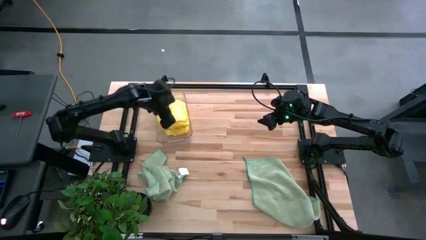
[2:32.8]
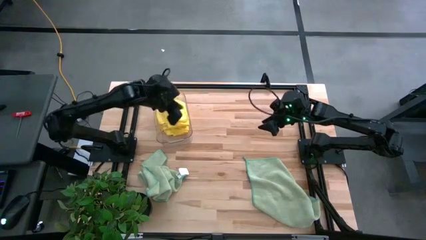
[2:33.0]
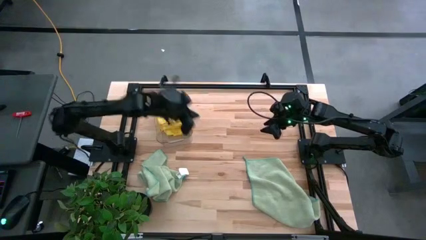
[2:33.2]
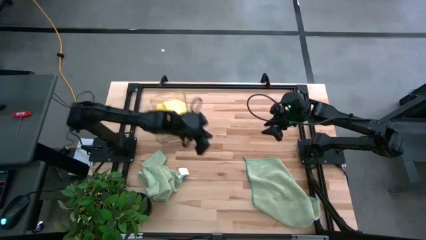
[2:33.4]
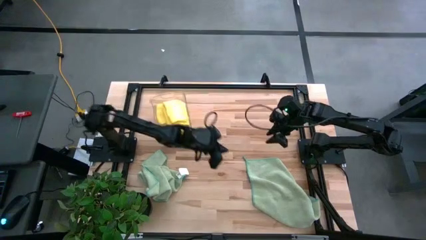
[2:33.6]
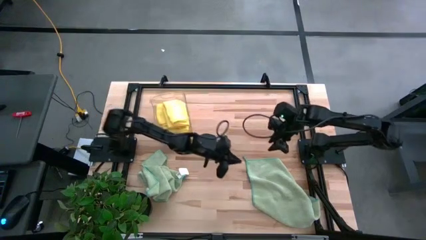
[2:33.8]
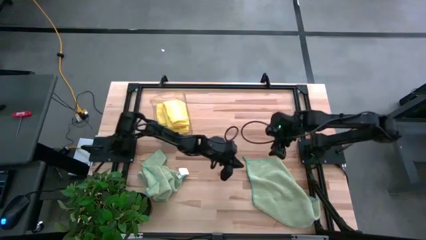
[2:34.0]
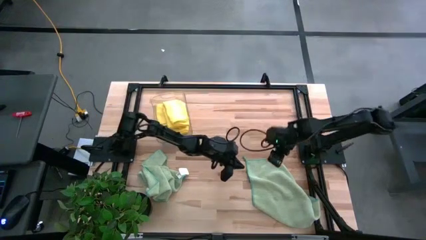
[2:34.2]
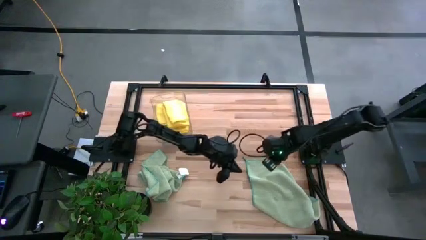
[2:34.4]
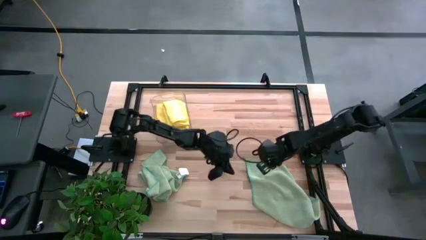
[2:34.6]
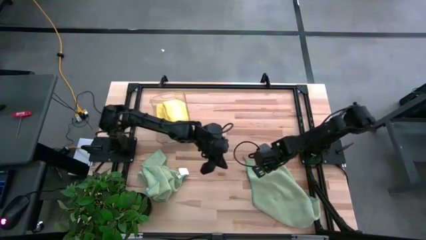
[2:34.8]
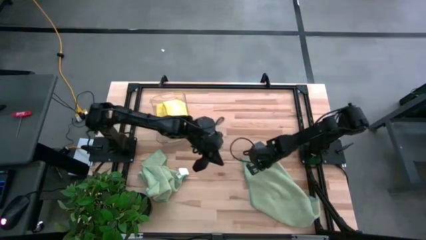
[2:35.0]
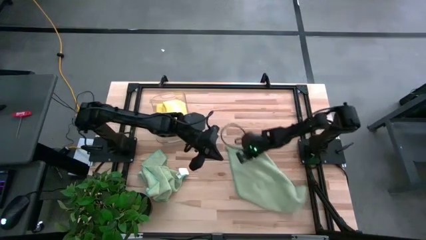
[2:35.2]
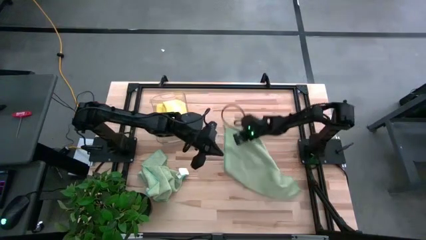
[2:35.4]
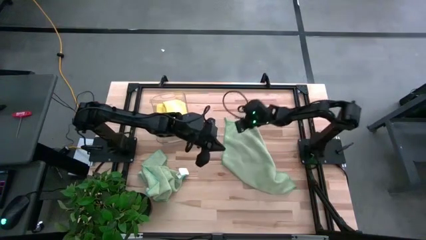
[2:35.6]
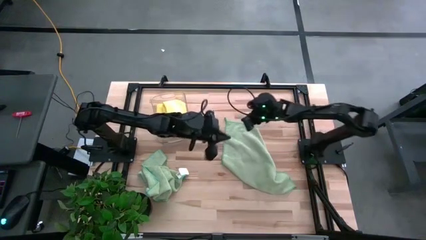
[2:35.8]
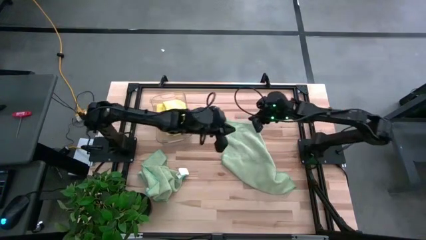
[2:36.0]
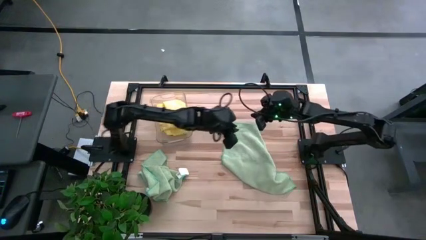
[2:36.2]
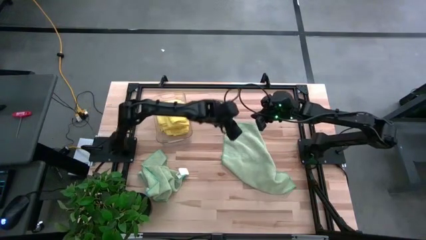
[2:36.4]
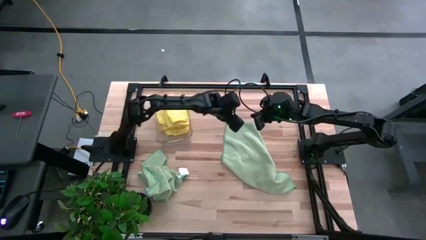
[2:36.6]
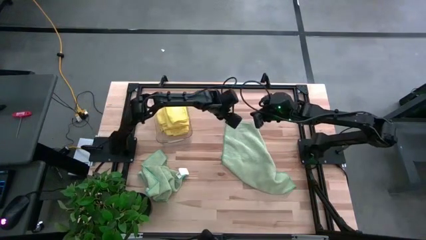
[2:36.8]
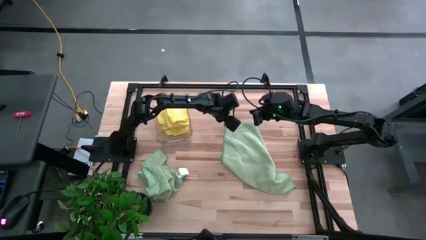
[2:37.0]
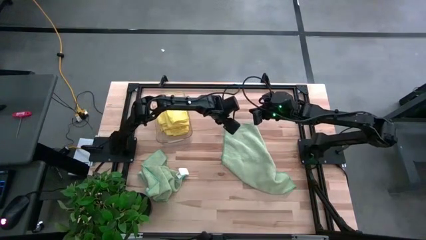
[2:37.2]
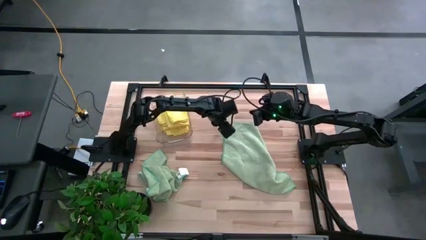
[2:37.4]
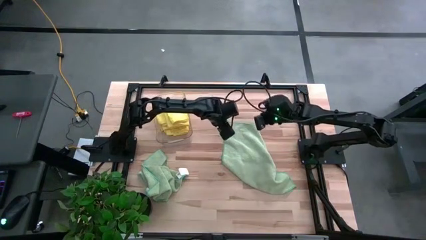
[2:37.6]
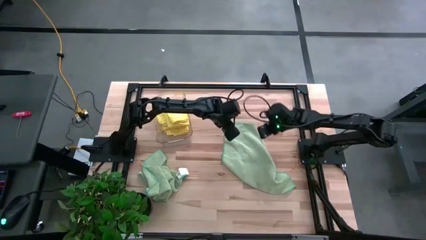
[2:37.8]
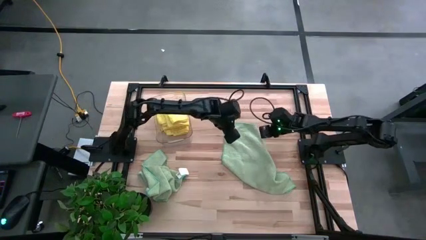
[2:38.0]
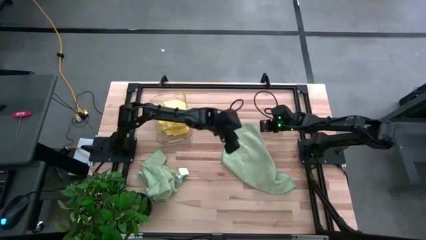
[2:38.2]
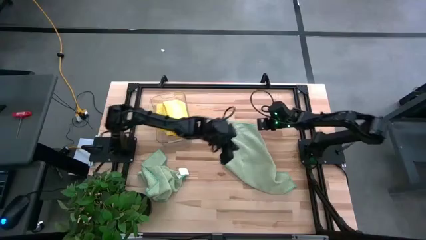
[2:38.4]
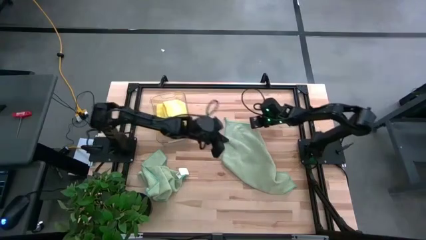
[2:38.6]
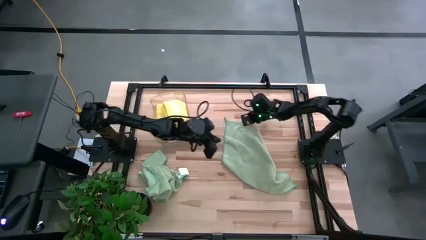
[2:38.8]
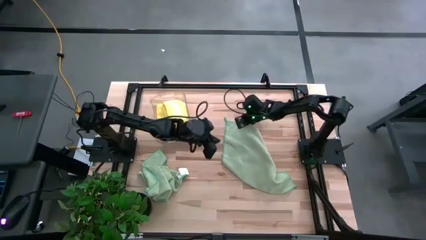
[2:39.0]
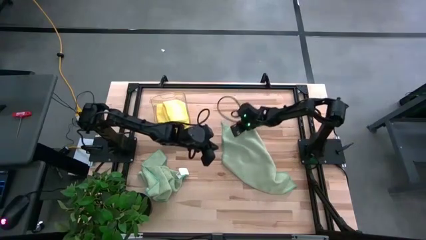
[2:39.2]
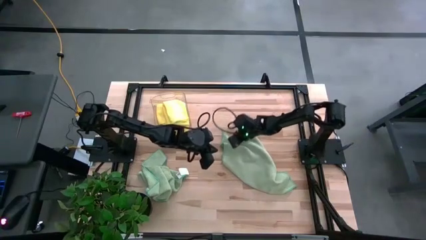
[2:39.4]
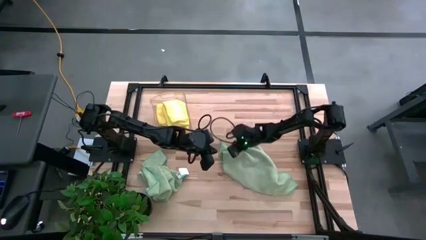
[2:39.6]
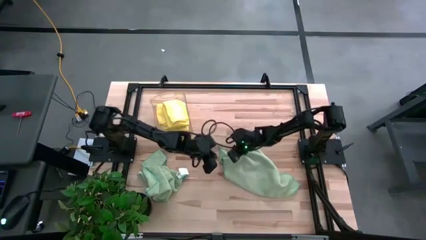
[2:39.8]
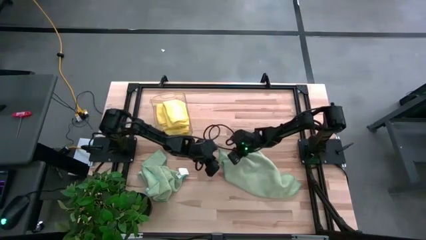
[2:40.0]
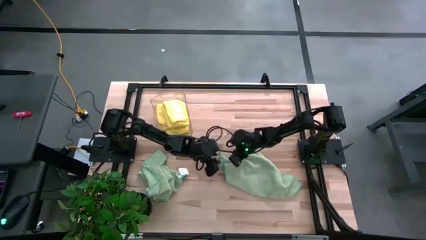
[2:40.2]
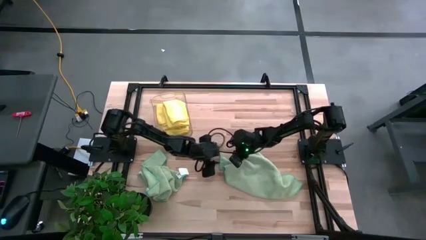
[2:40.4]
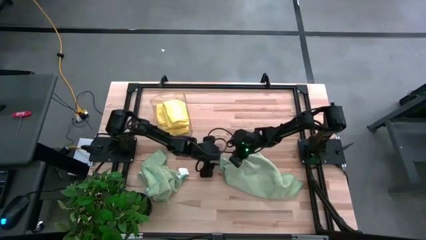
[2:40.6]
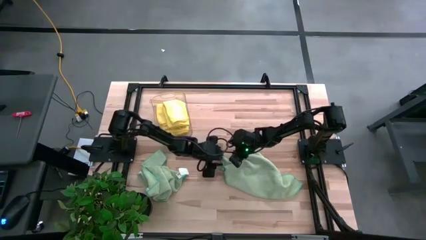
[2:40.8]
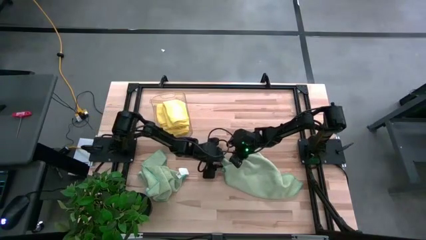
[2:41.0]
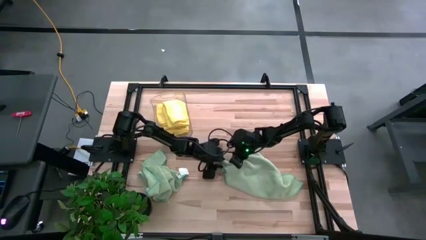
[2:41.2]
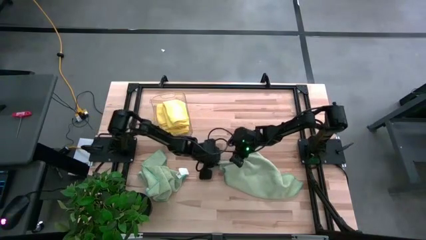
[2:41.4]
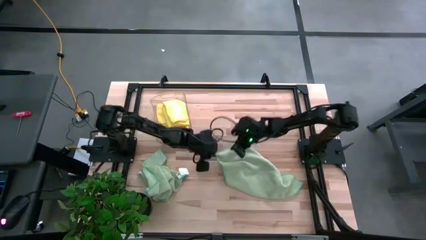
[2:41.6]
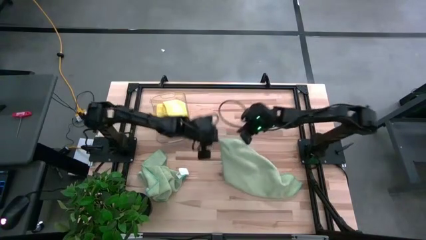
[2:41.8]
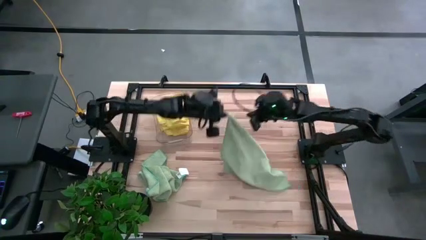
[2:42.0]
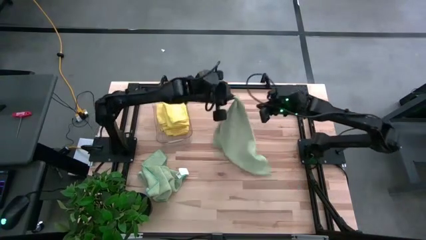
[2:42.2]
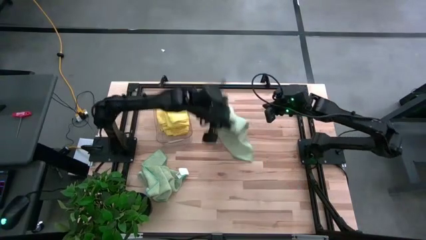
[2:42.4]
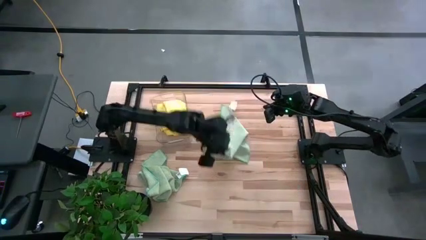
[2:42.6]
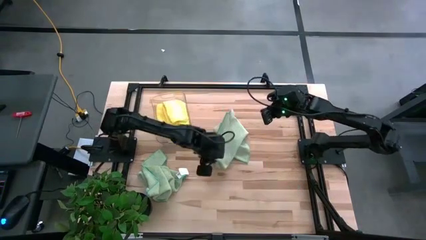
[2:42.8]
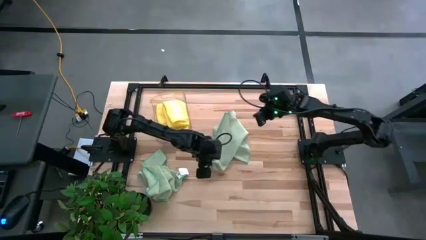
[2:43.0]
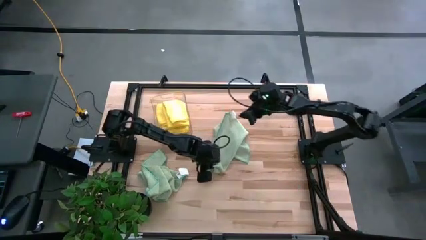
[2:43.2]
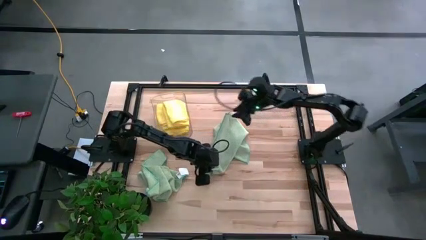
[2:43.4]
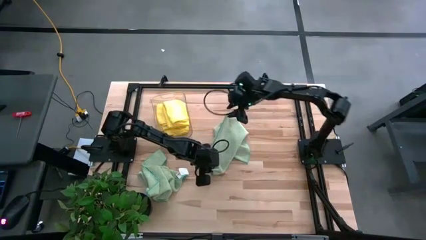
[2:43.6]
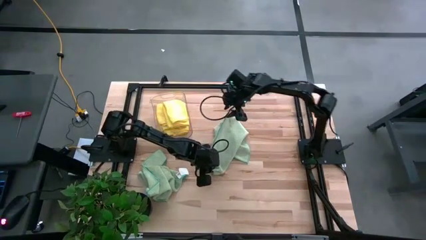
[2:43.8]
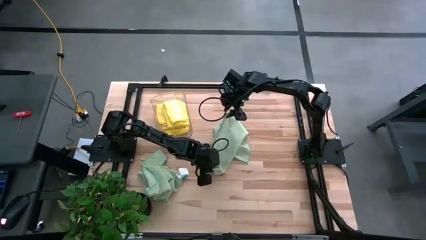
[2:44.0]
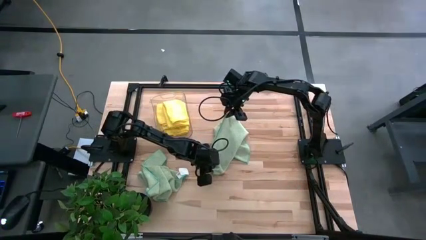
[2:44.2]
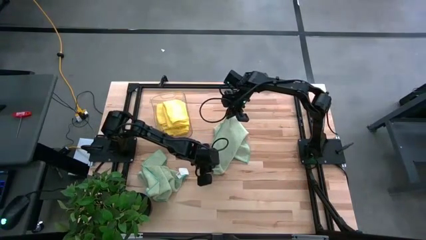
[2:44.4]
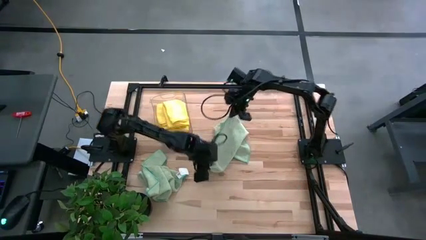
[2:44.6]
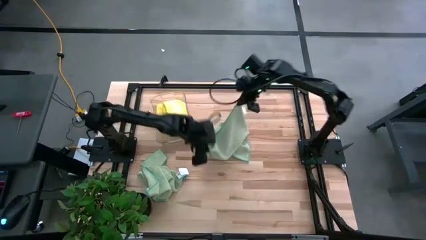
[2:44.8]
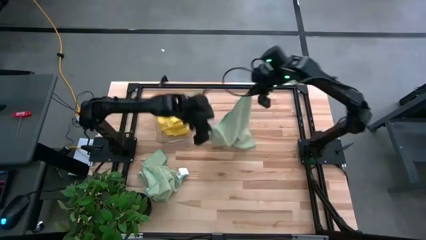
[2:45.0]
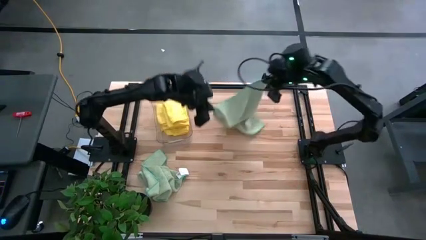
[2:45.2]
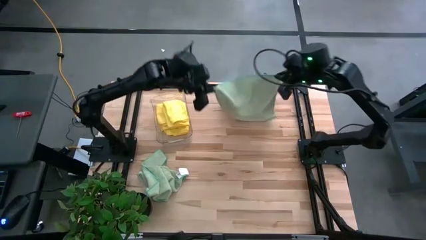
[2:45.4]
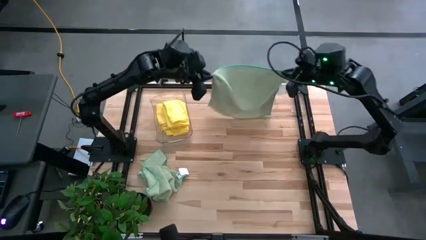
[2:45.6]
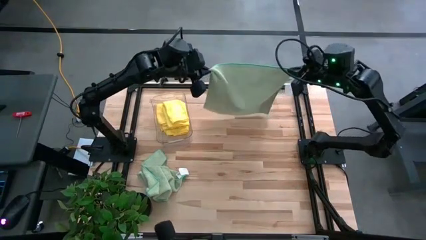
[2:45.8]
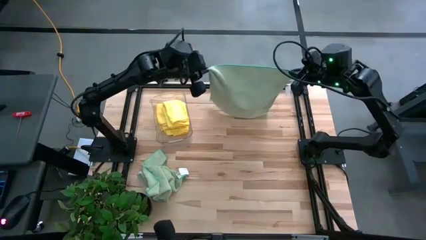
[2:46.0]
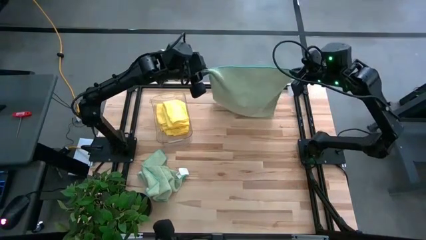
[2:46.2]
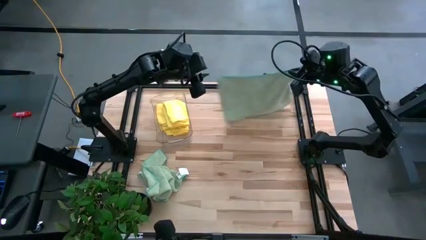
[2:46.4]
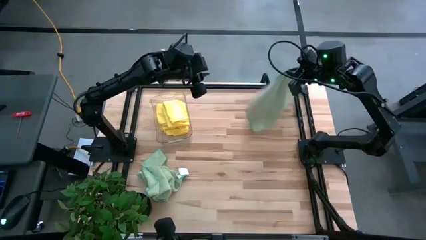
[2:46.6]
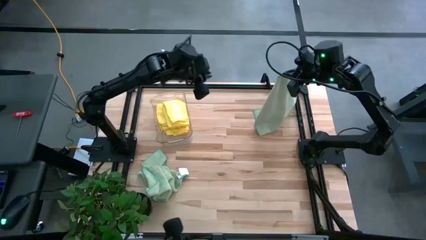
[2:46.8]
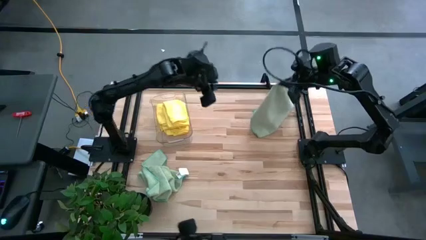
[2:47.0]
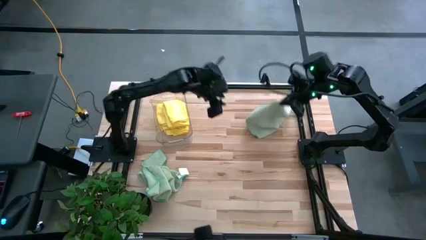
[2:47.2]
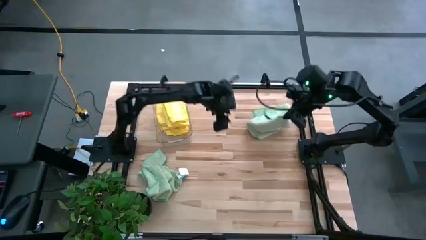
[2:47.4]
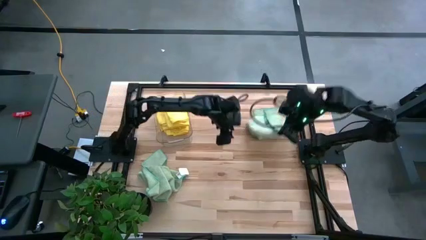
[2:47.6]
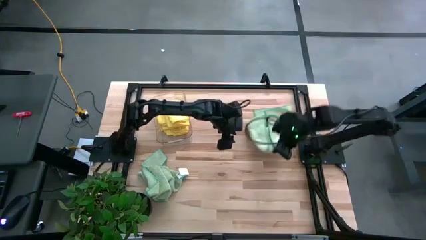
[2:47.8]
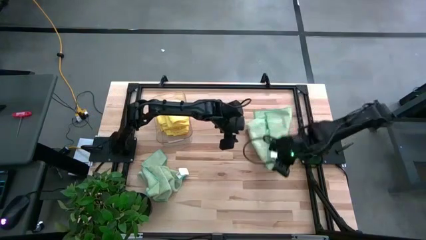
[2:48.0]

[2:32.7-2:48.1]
Task: Fold microfiber towels
Fold the right green towel
